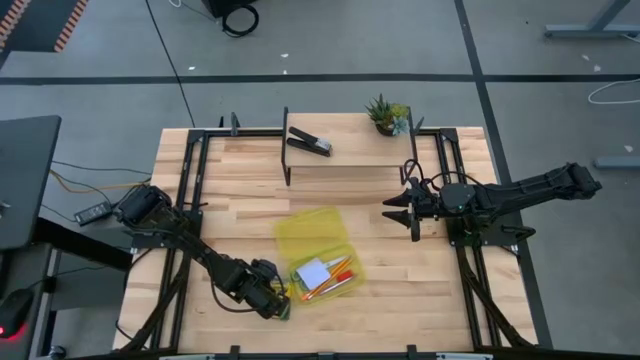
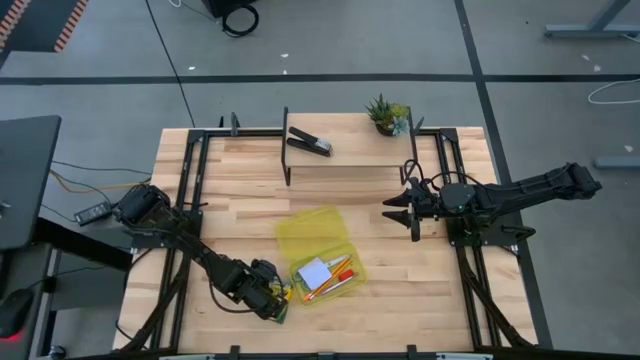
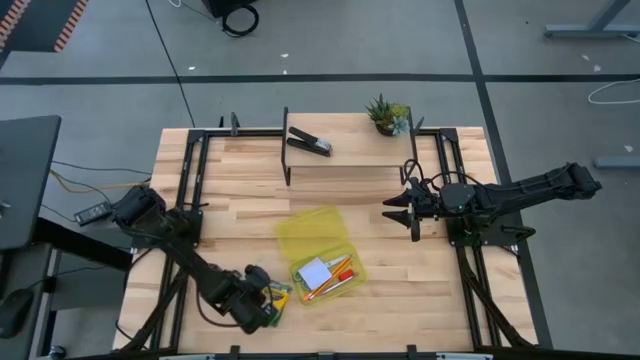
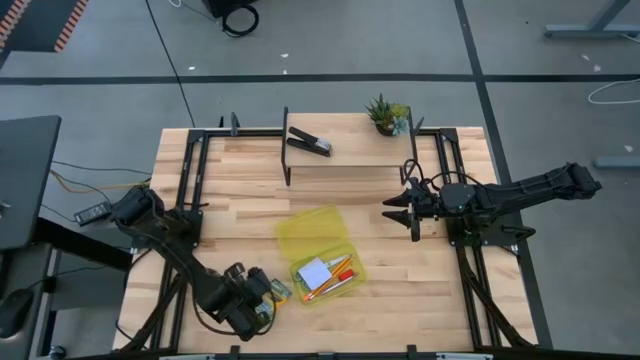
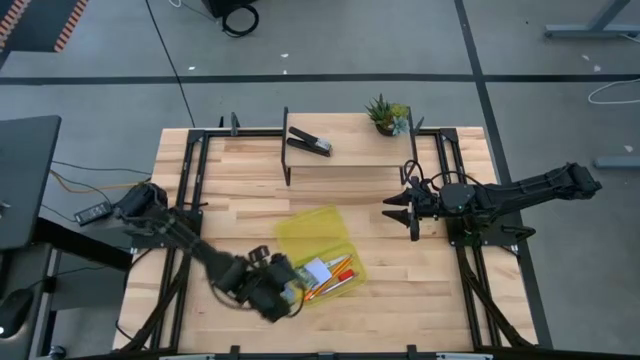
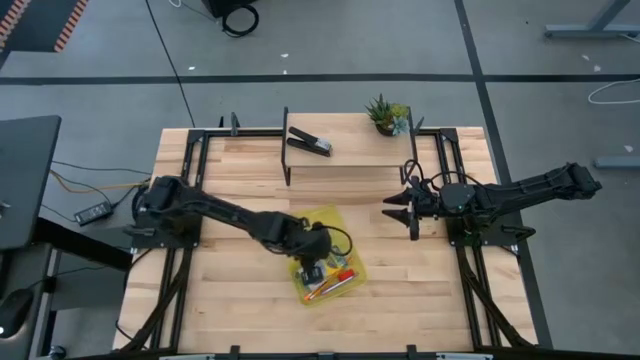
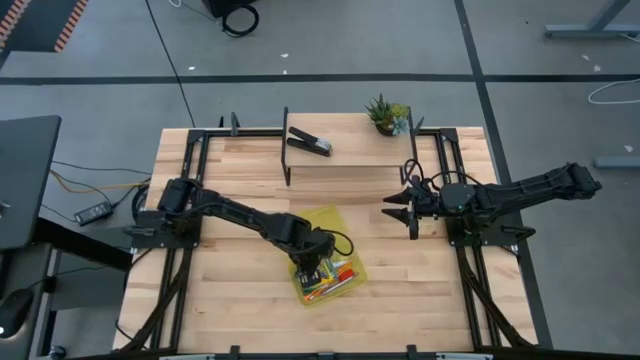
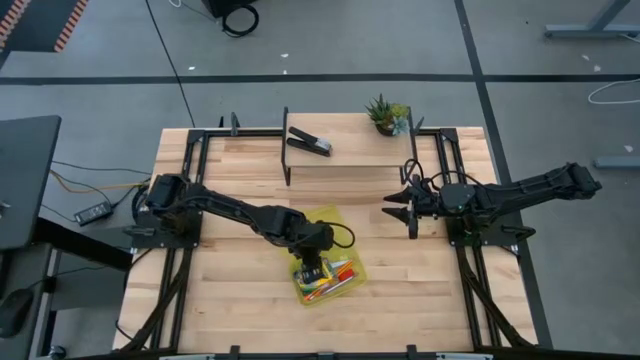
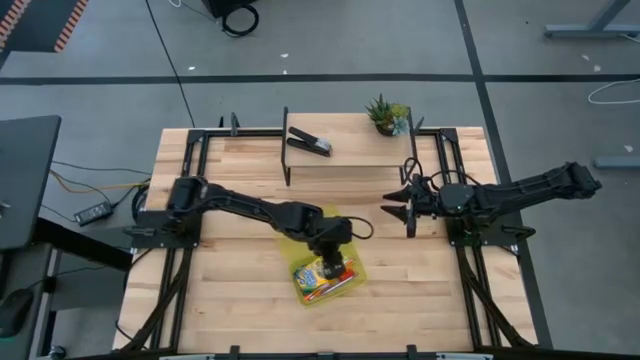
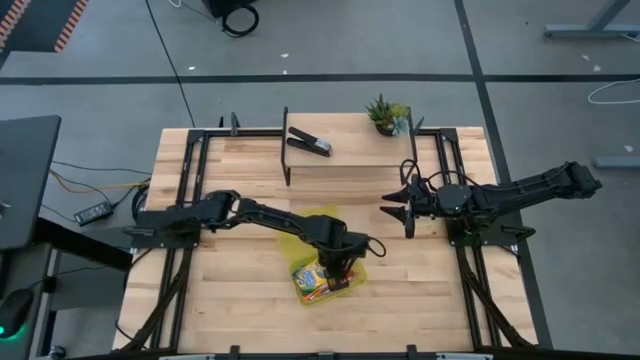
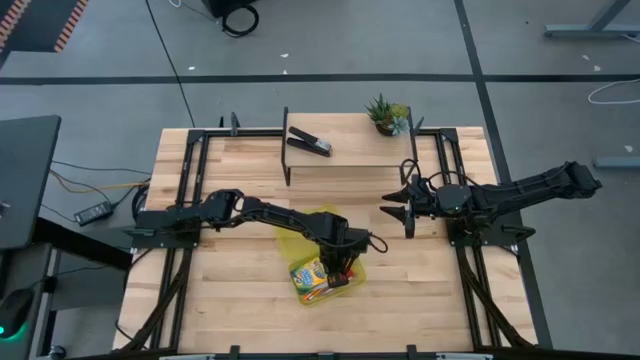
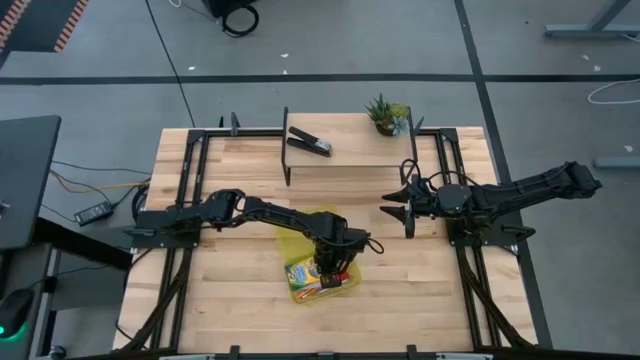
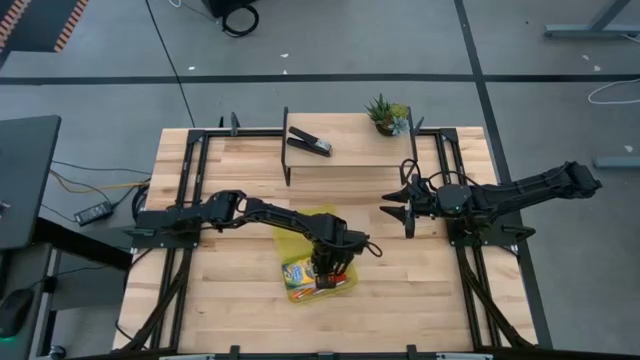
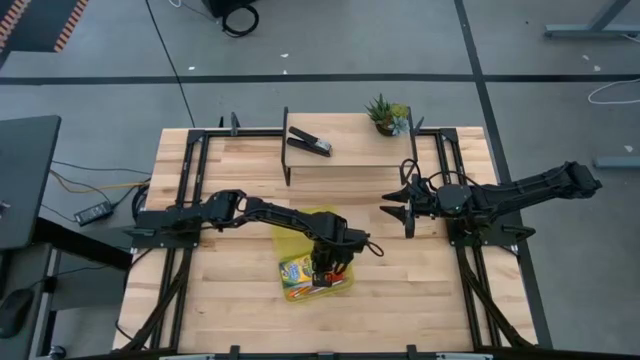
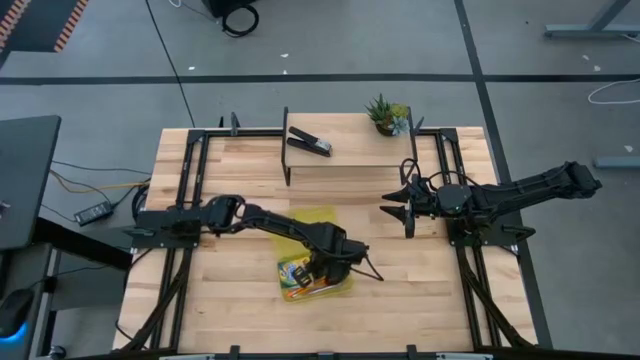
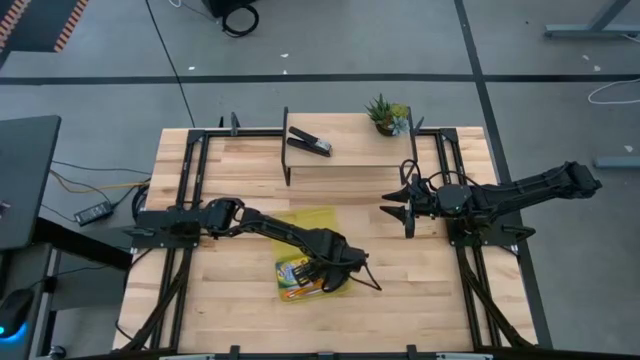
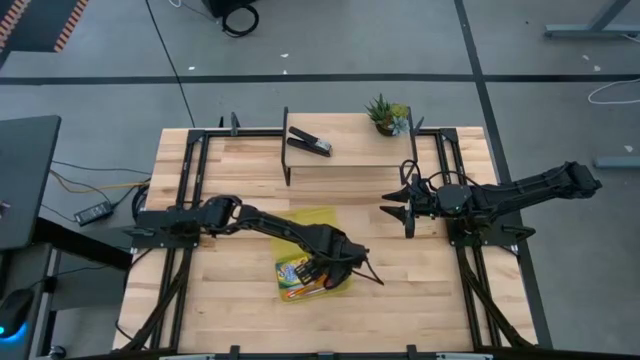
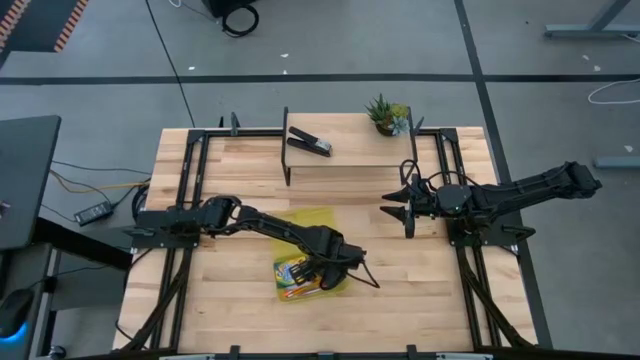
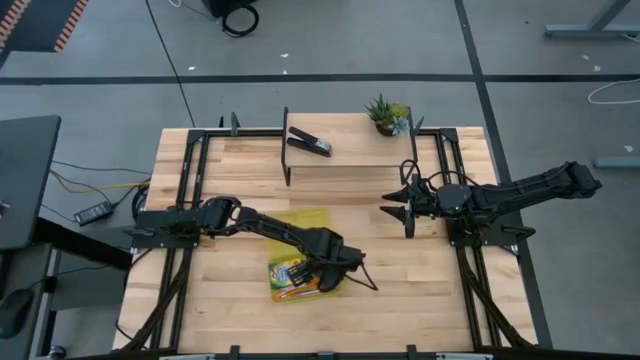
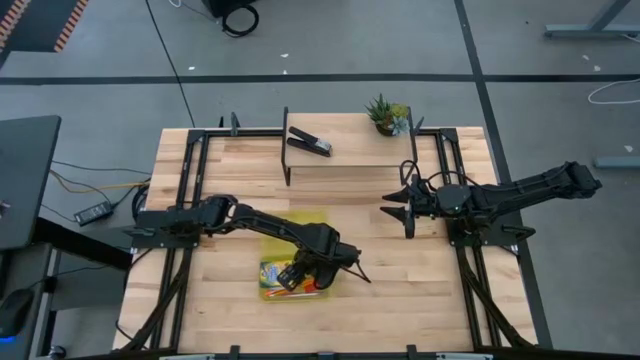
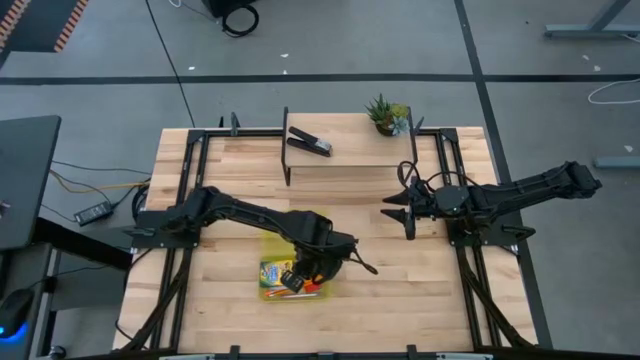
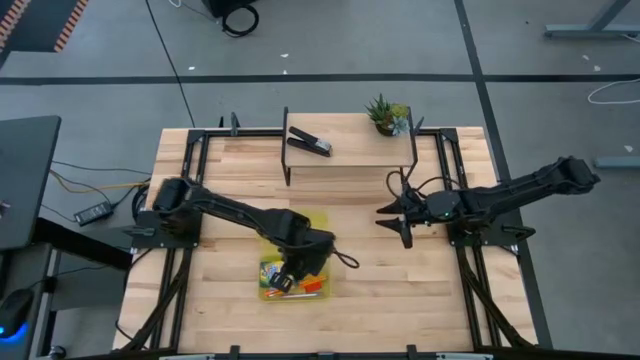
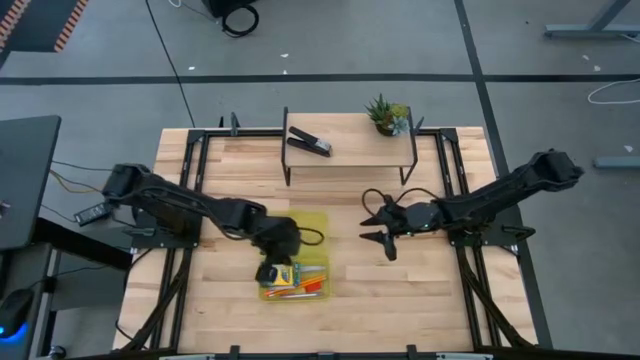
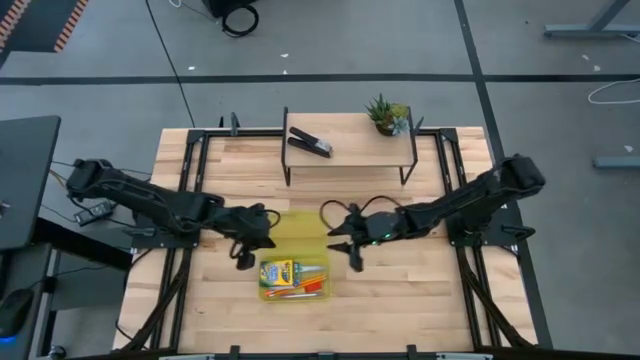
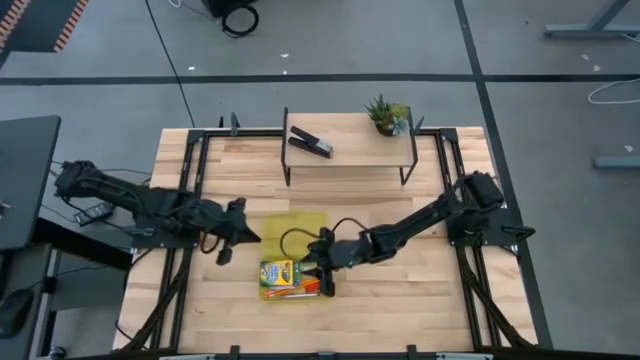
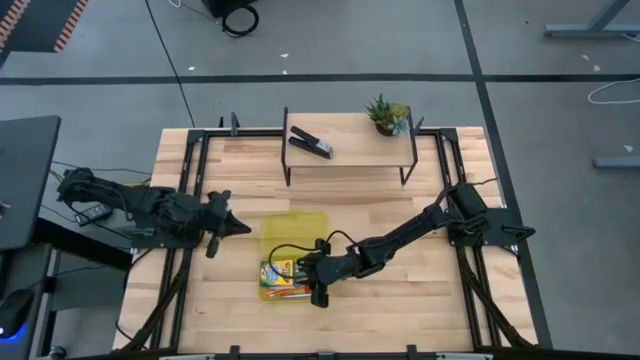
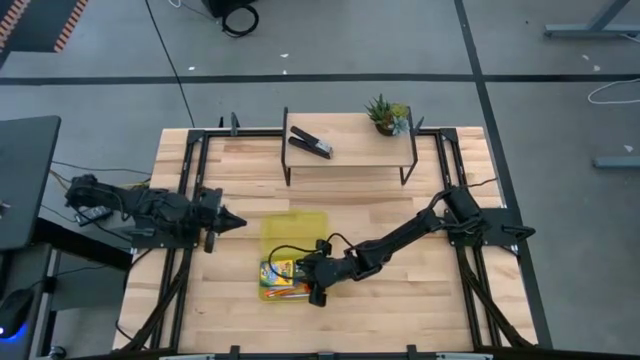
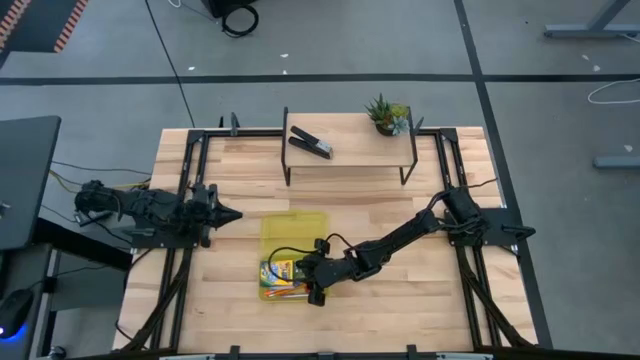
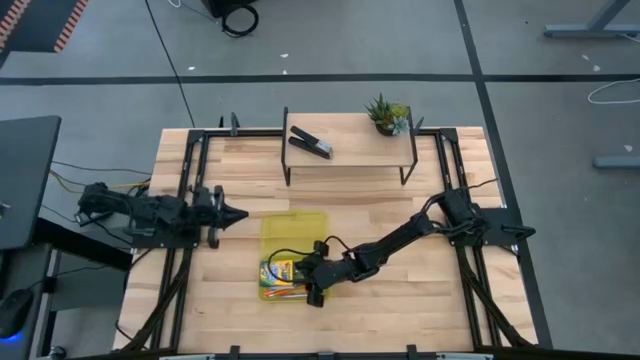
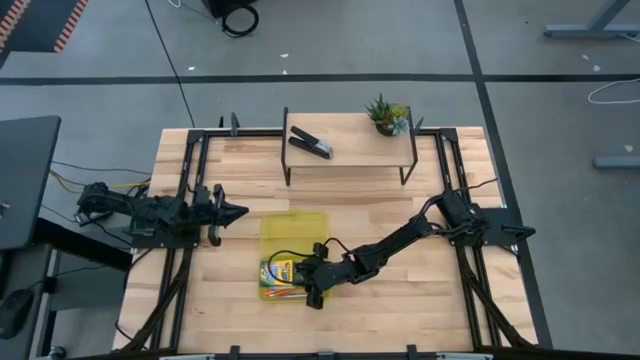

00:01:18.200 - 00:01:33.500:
Task: Pack school essentials
Put the crayon box into the yellow supply box

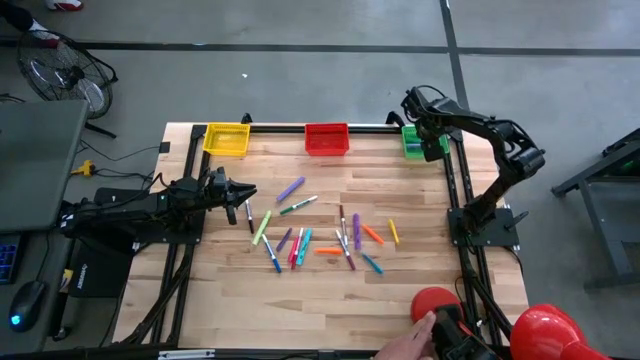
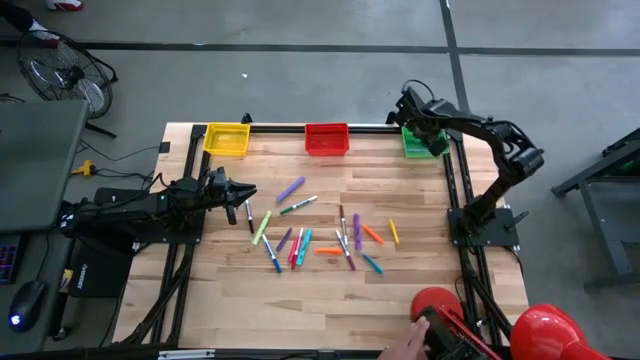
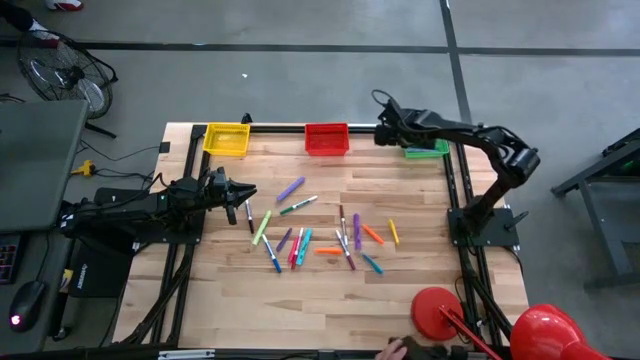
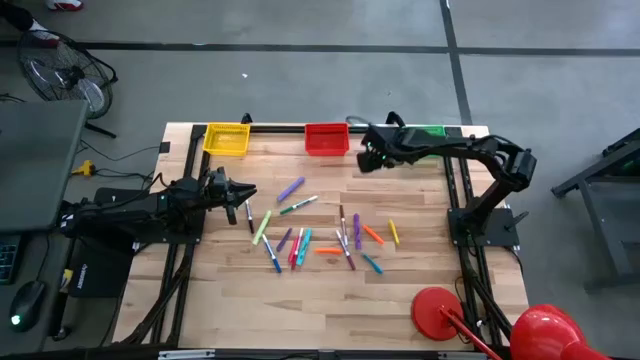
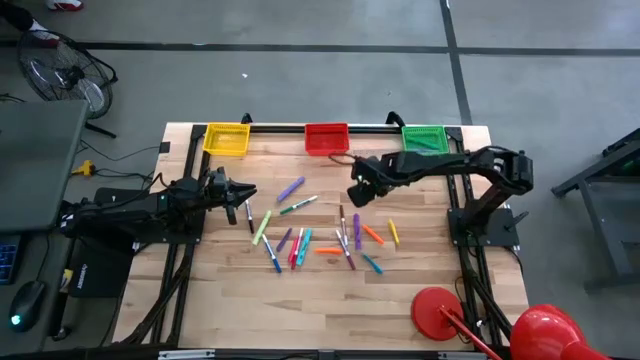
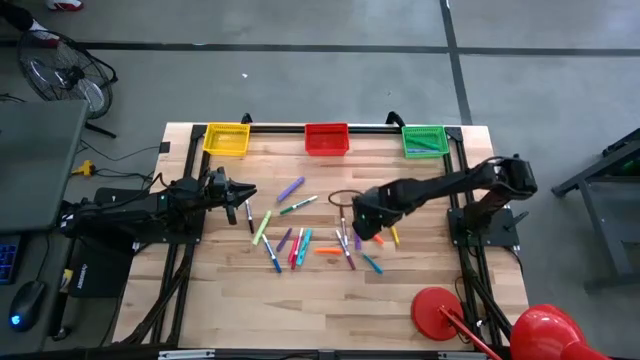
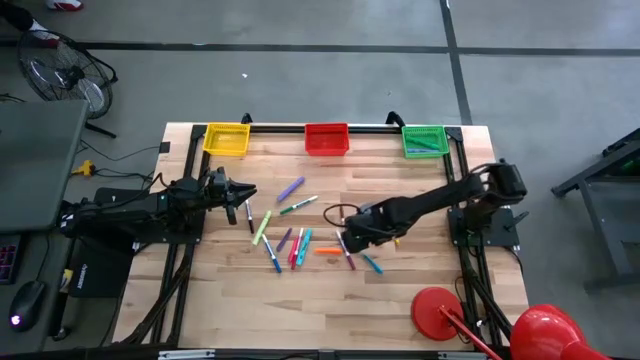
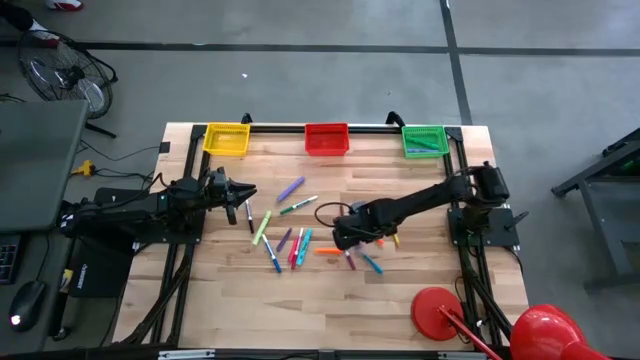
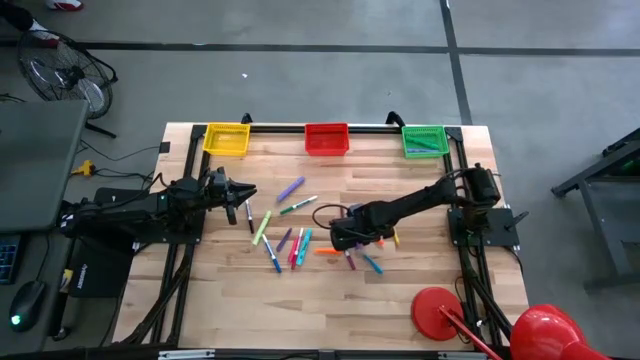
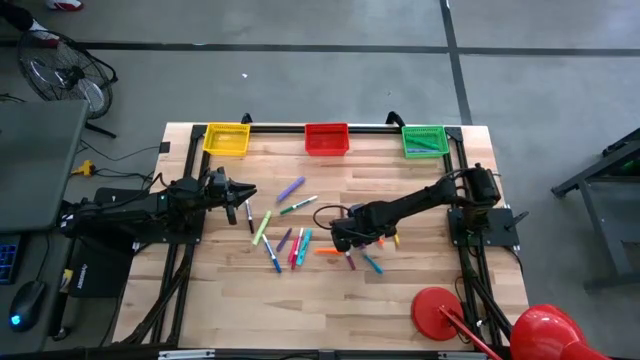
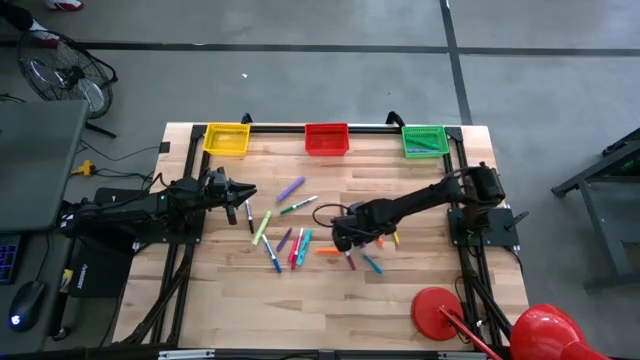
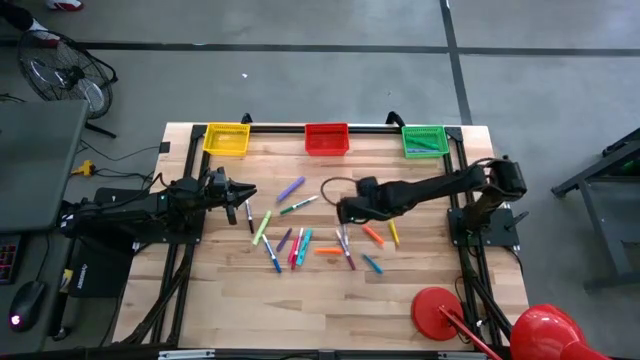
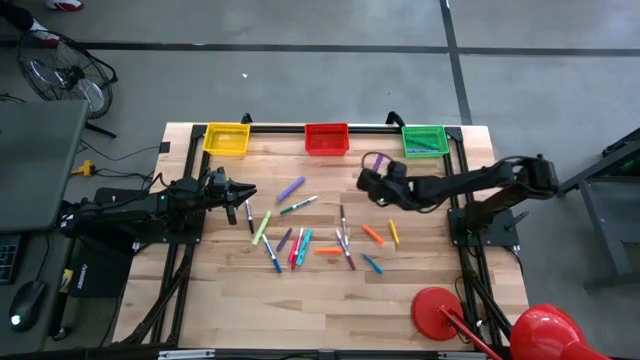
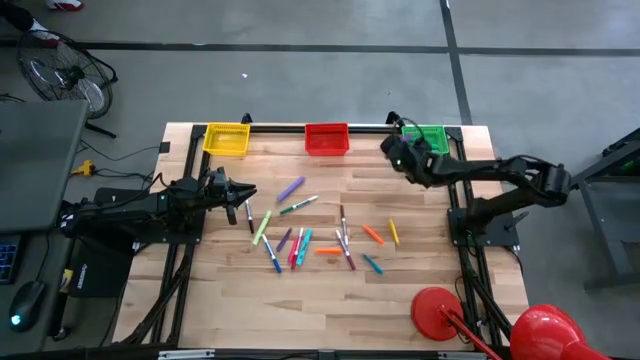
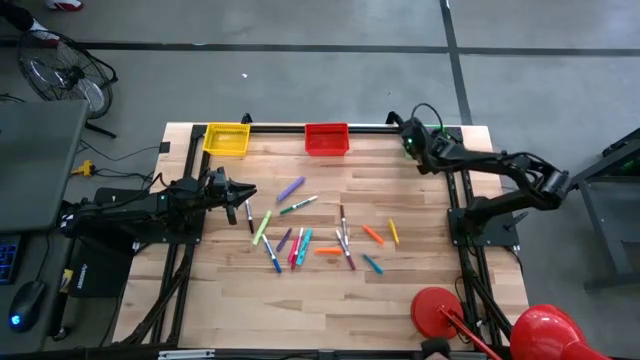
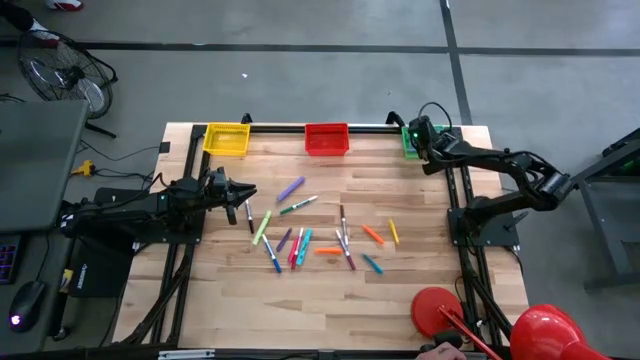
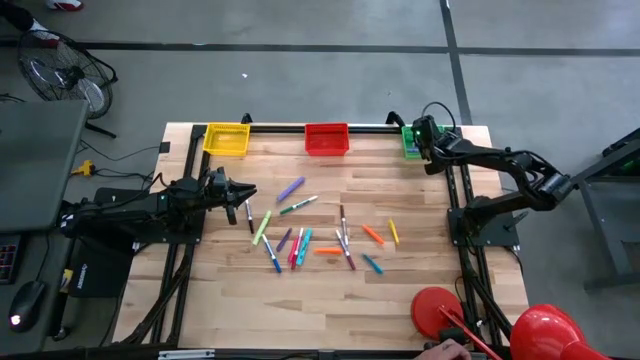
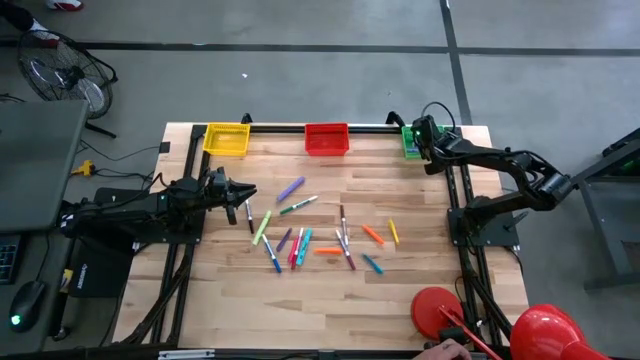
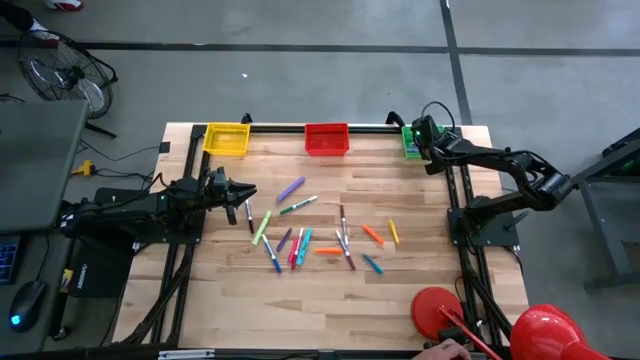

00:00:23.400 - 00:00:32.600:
Task: Pick & Place Markers
Put the purple highlighter into the green bin
